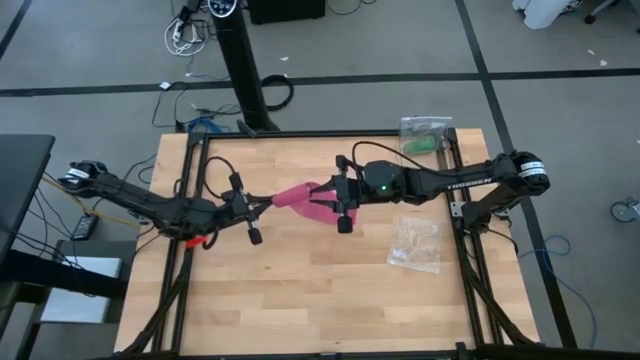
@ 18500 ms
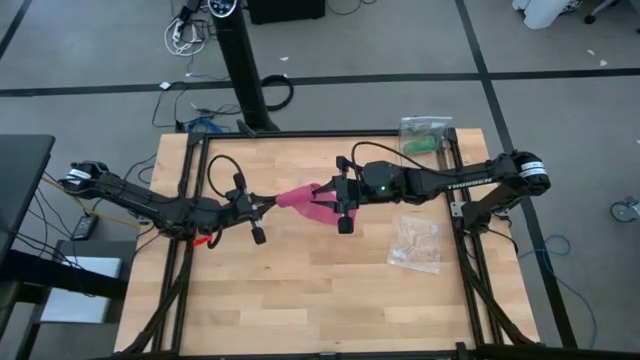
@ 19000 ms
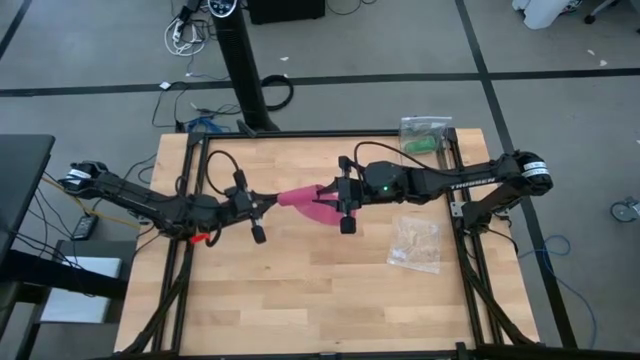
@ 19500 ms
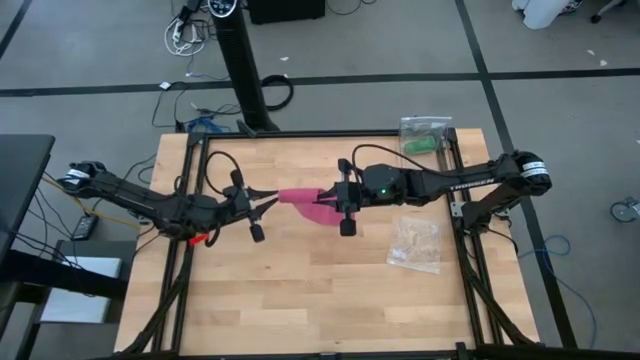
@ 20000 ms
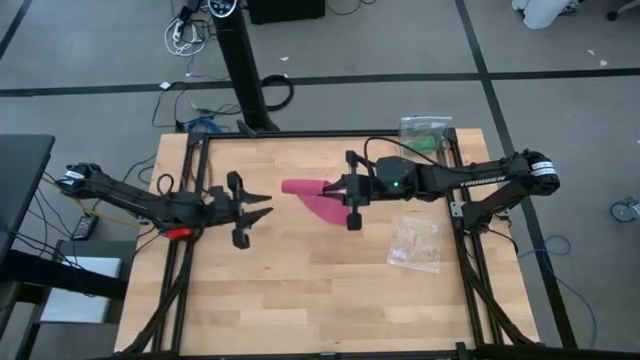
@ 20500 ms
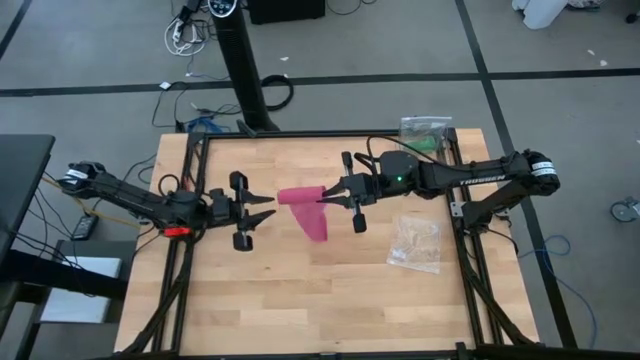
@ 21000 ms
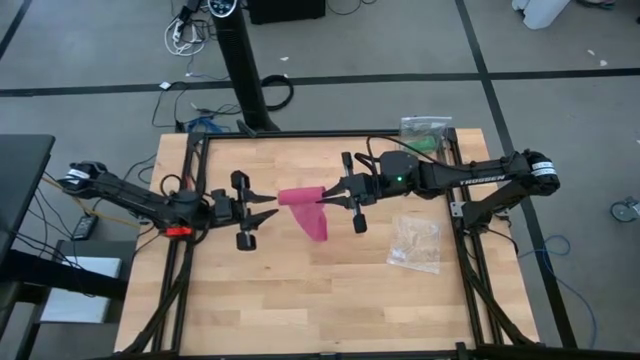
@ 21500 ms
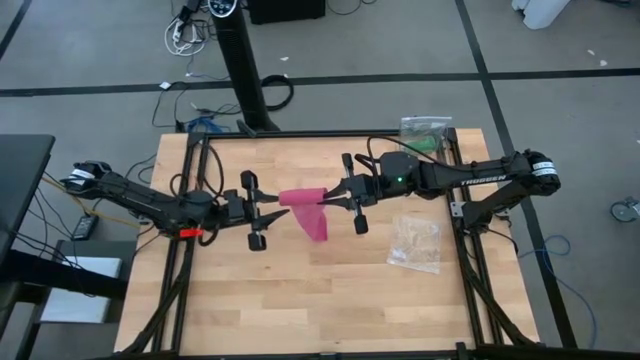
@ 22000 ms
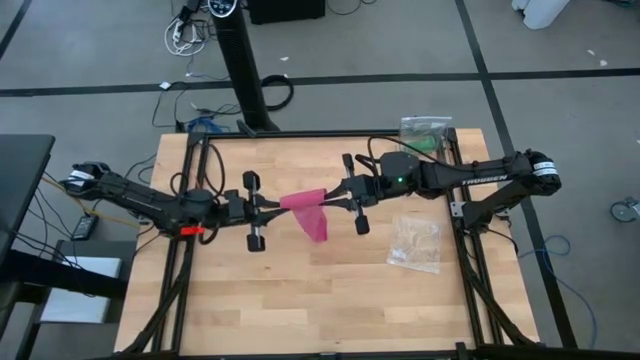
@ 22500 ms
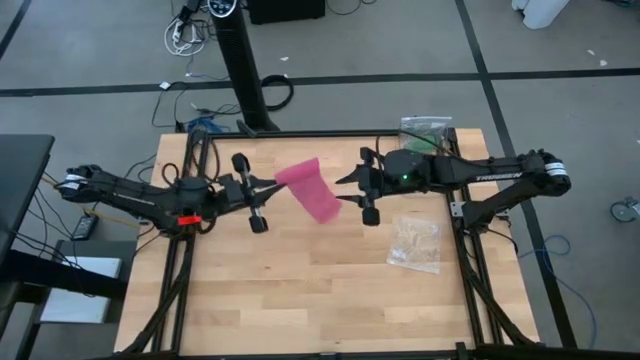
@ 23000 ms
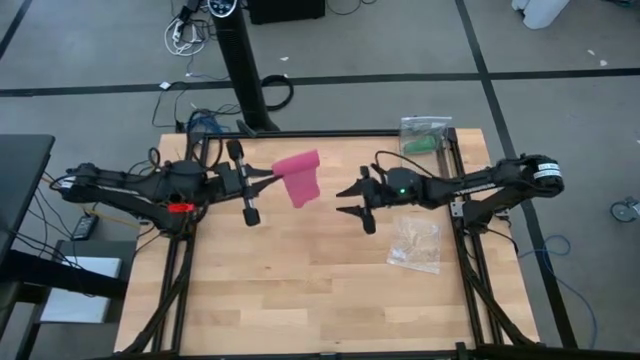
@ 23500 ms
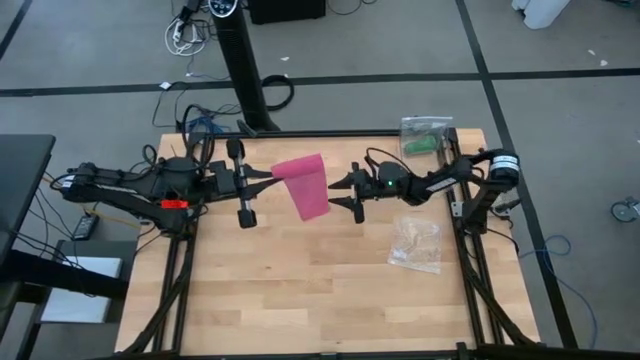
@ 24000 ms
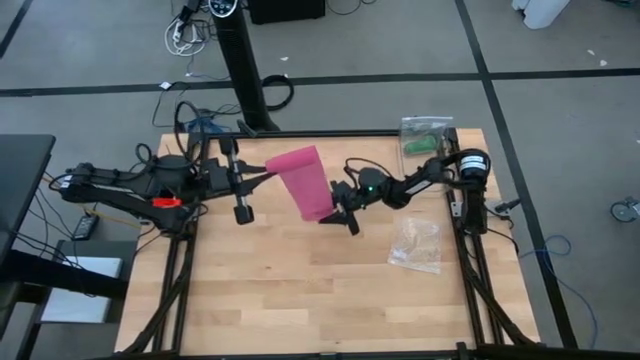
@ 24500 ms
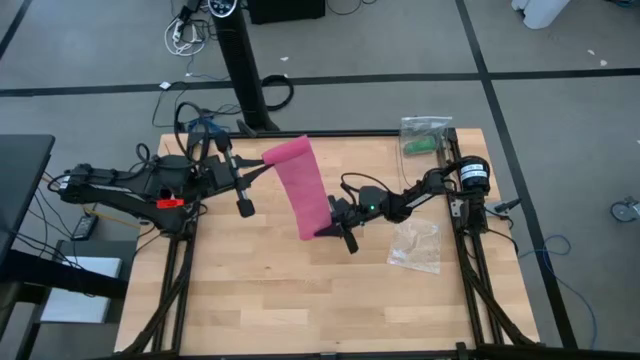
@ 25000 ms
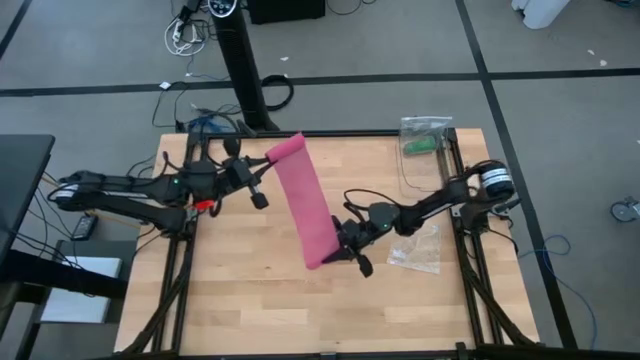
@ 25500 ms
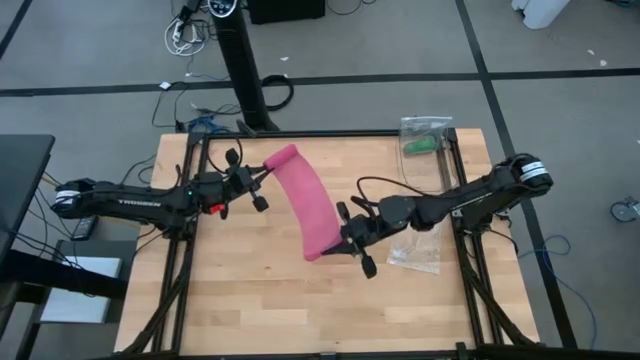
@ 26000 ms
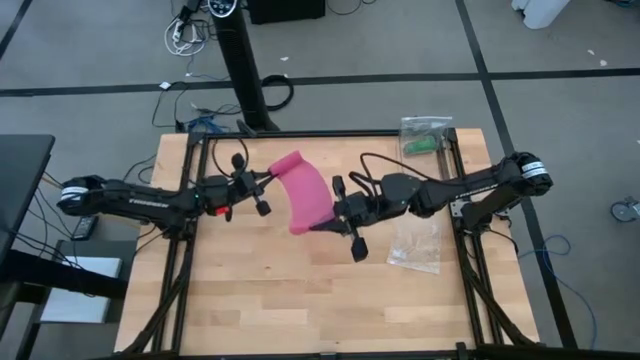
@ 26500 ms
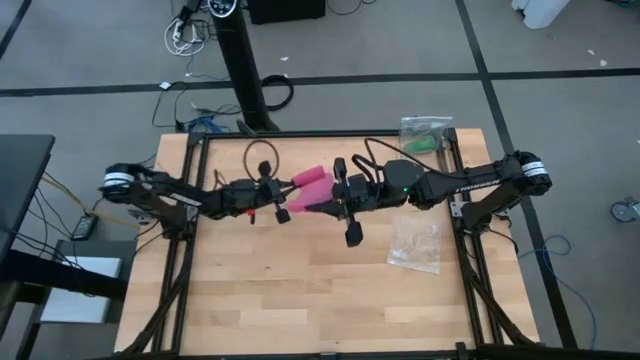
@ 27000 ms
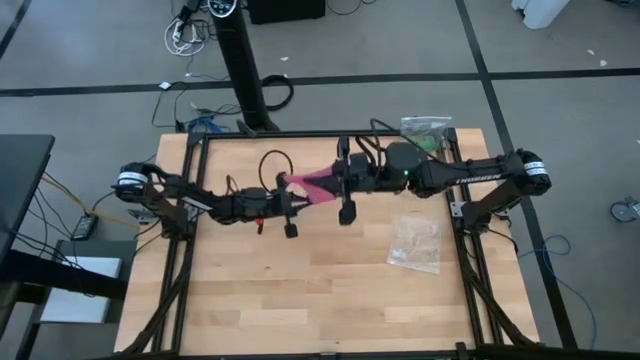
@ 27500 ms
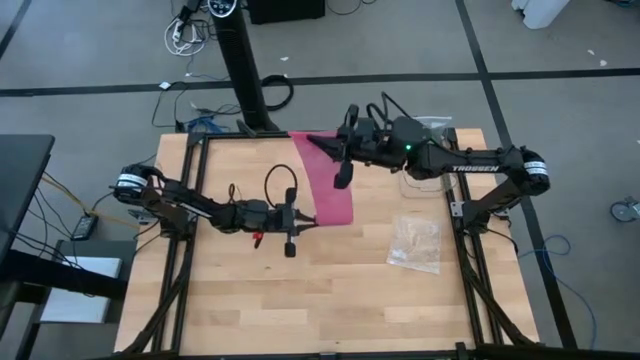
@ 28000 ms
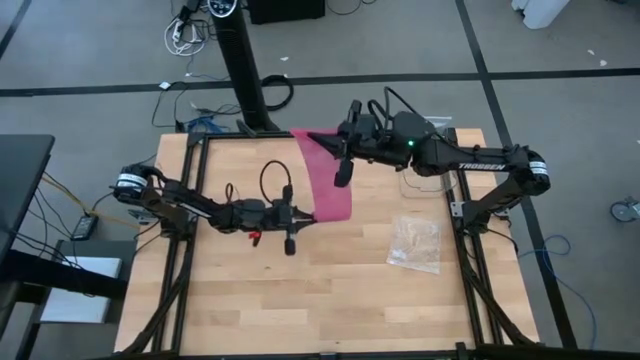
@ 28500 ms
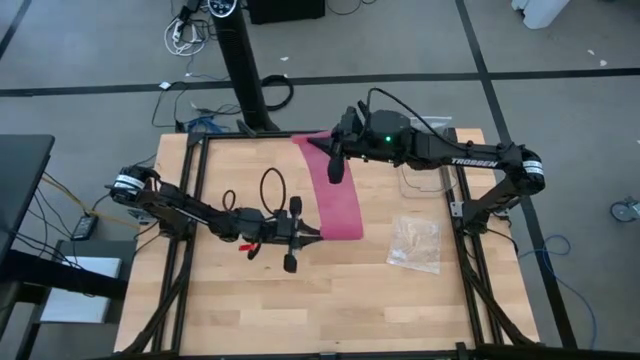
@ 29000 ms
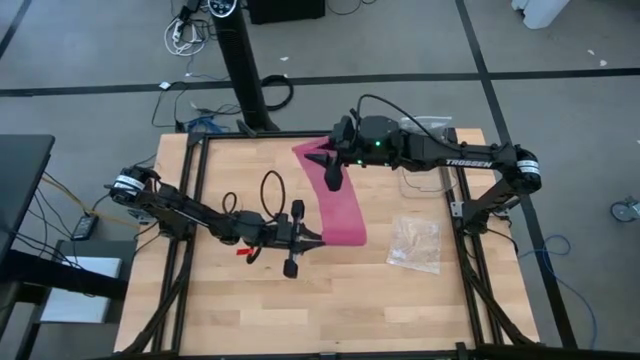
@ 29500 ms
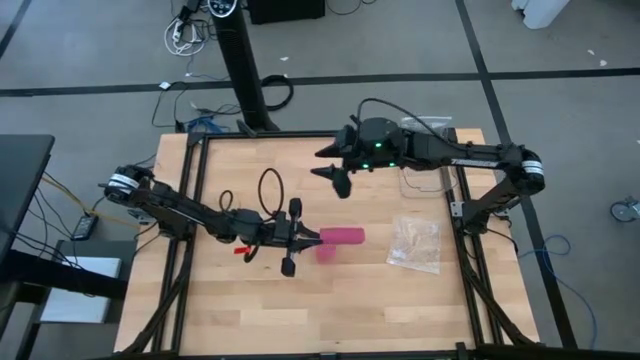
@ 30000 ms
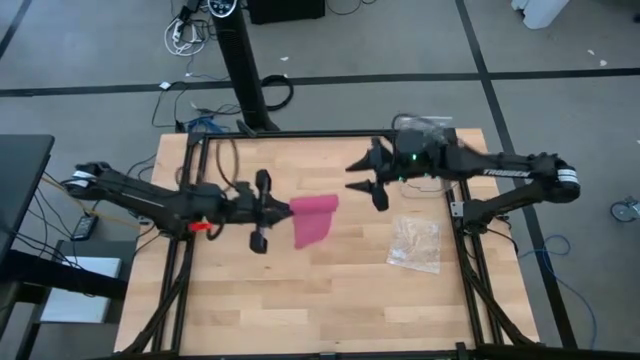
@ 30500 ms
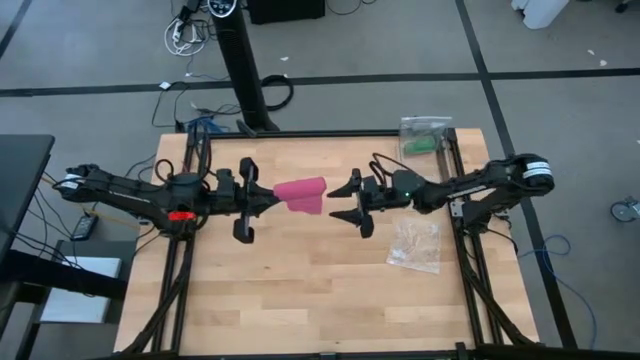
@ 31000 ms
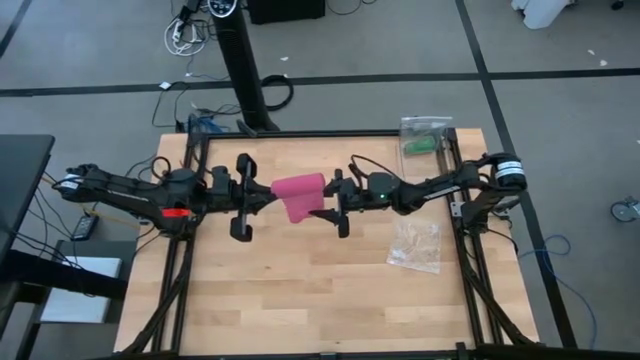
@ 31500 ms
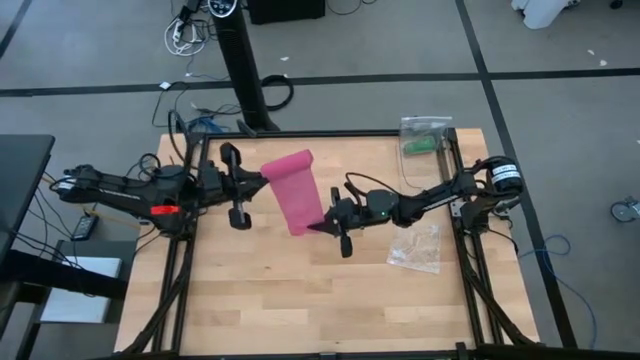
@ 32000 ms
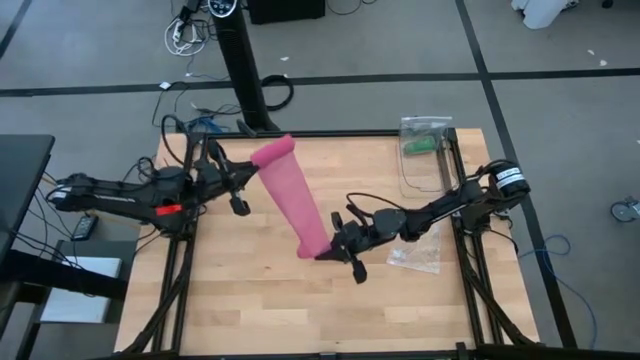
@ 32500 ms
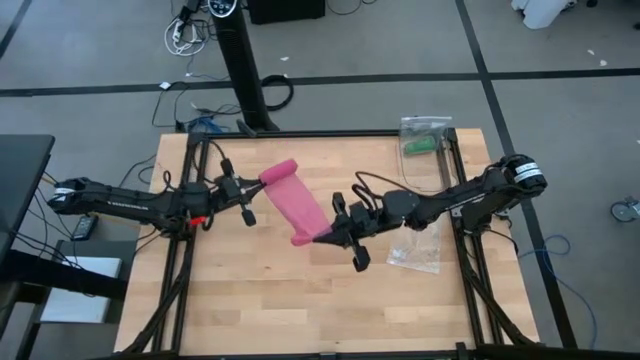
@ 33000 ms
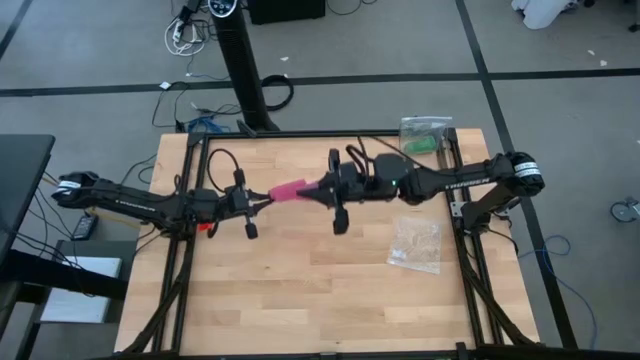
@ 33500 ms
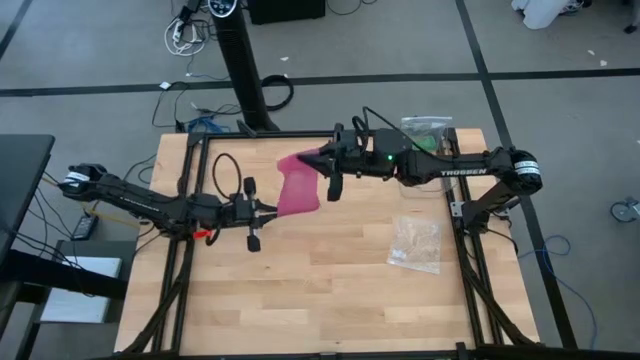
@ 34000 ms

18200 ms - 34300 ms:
Task: Roll bandage
Roll the pink bandage

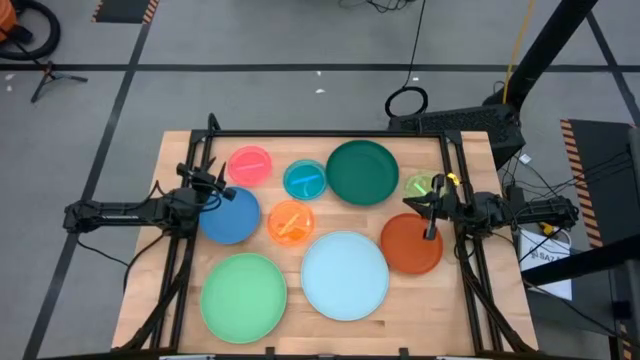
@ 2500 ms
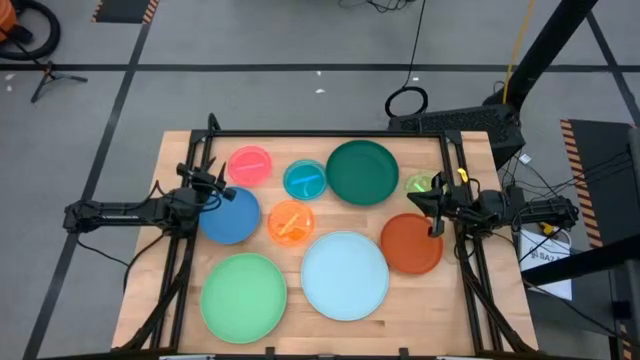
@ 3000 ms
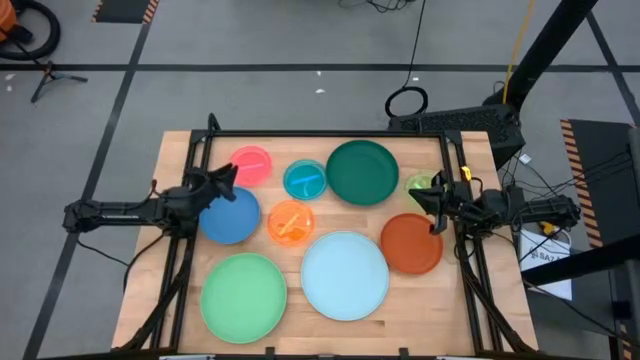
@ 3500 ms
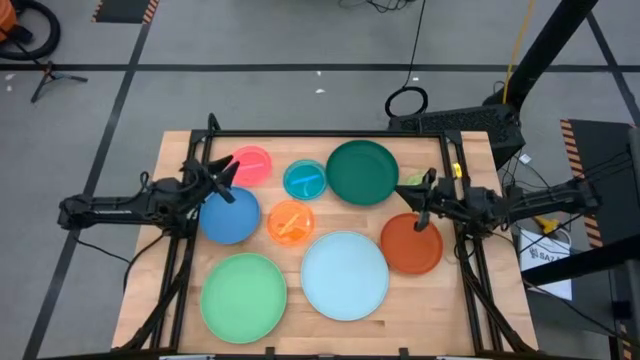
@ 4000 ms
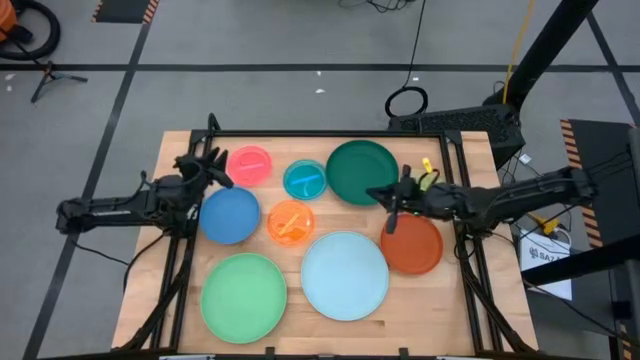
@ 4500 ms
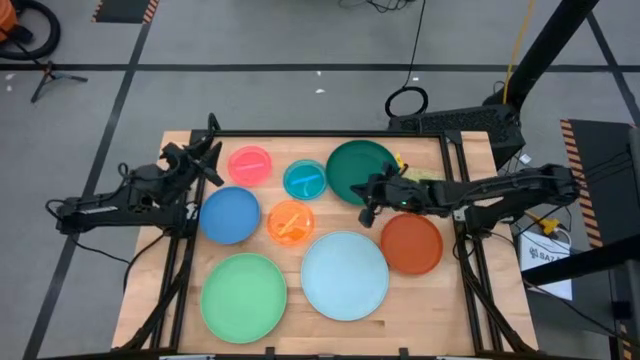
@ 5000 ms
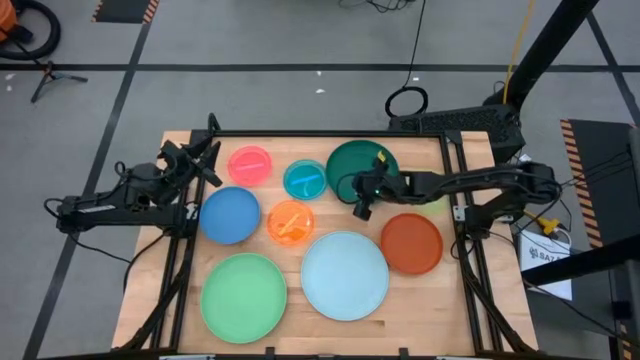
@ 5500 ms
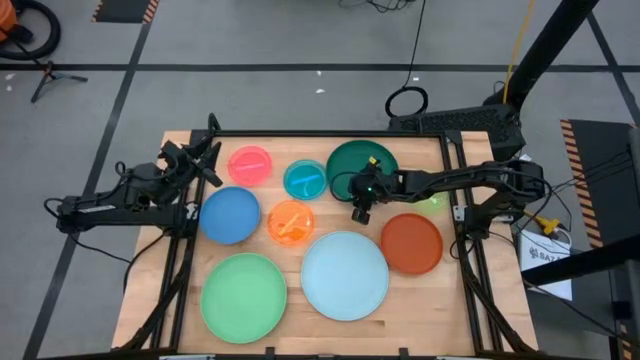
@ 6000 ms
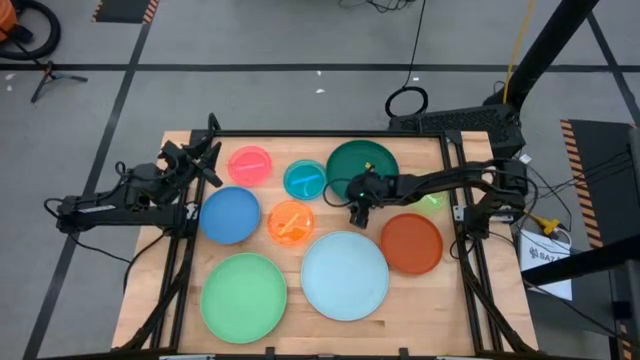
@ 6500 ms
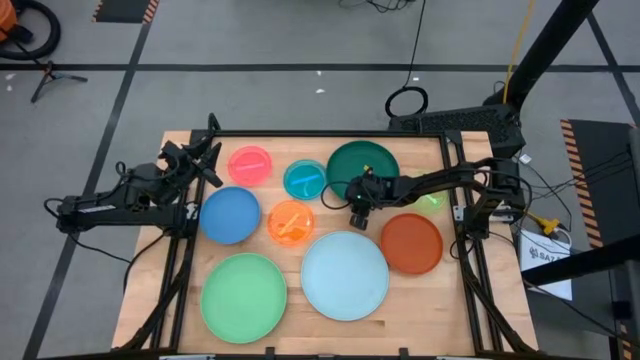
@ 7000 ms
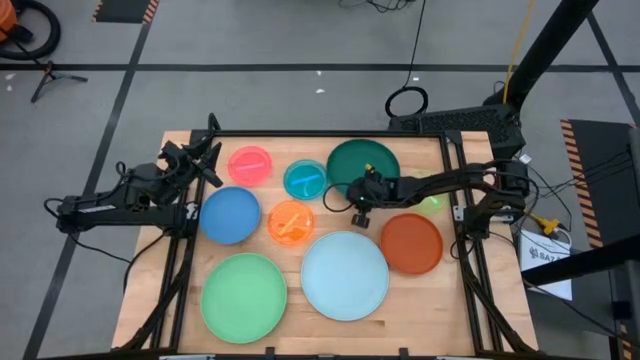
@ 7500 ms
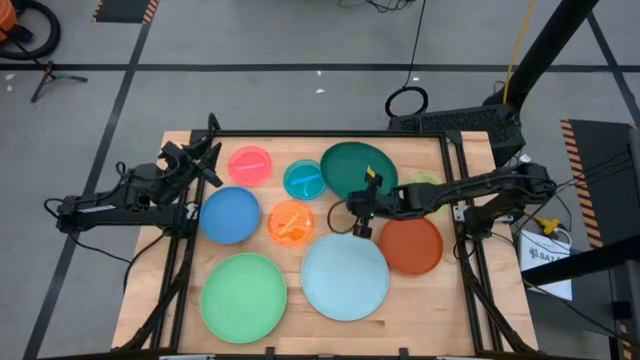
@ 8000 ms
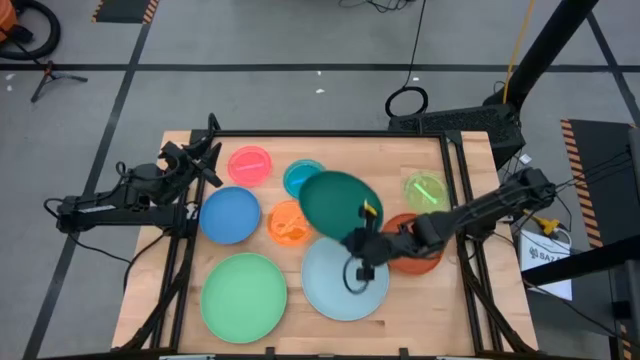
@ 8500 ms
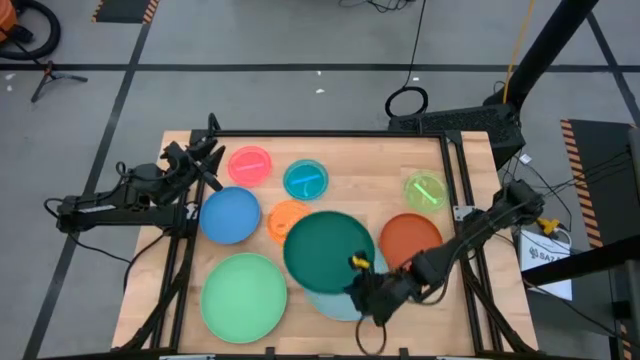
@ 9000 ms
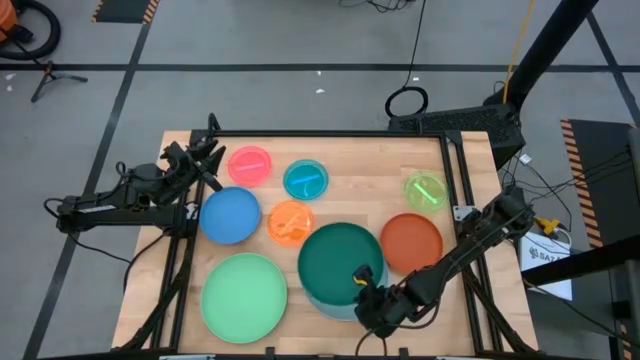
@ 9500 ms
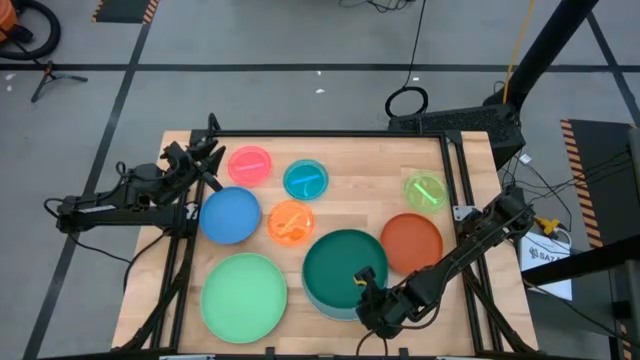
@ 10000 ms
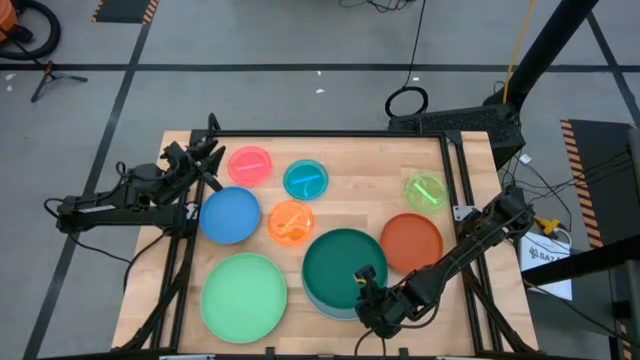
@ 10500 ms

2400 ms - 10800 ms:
Task: Stack plastic plates
Stack the dark green plate on top of the light blue plate
